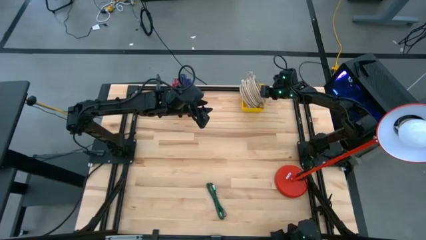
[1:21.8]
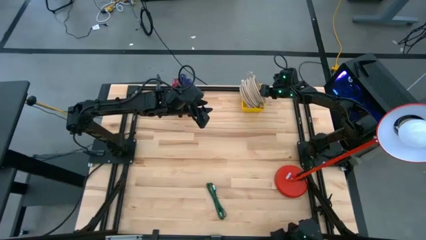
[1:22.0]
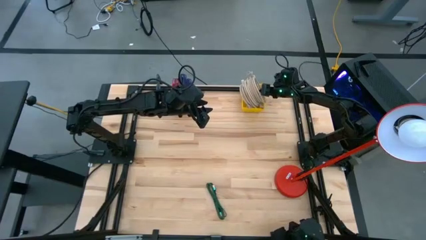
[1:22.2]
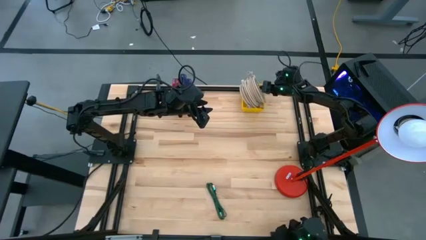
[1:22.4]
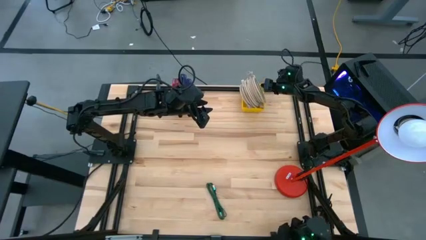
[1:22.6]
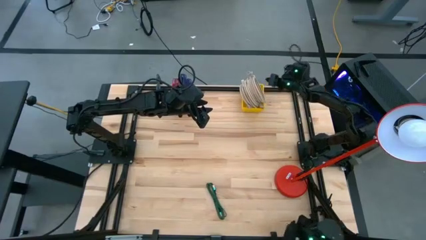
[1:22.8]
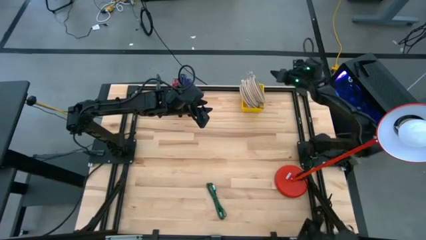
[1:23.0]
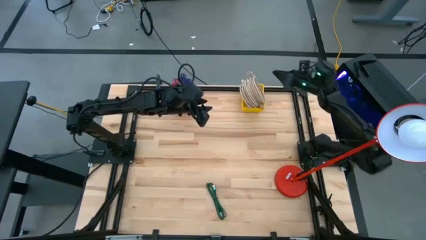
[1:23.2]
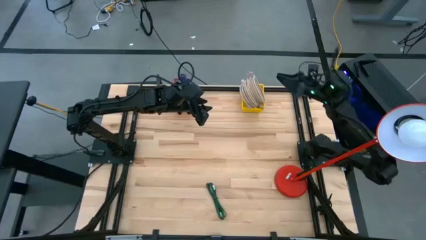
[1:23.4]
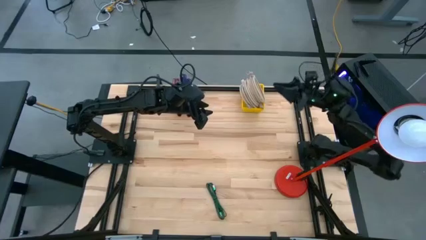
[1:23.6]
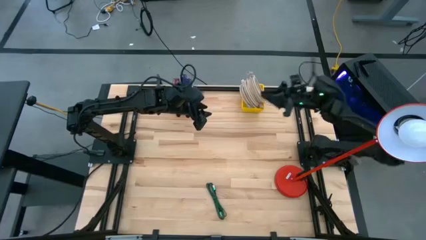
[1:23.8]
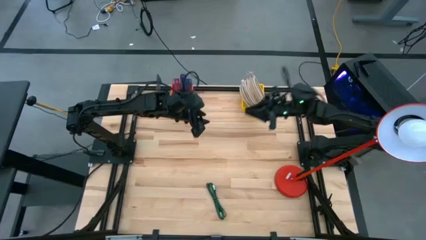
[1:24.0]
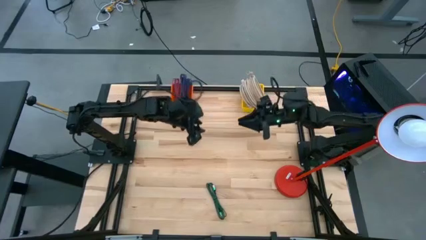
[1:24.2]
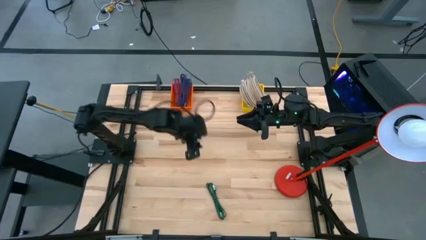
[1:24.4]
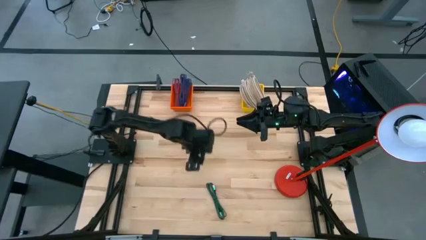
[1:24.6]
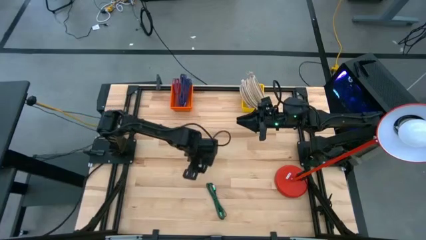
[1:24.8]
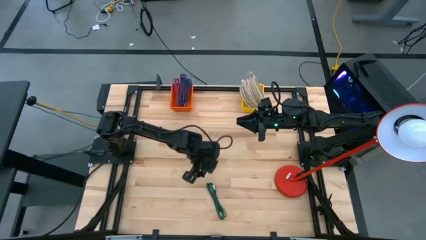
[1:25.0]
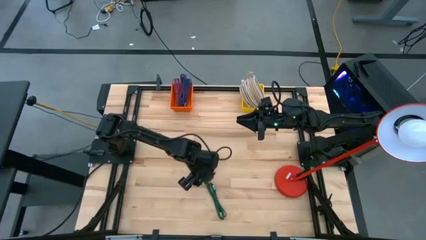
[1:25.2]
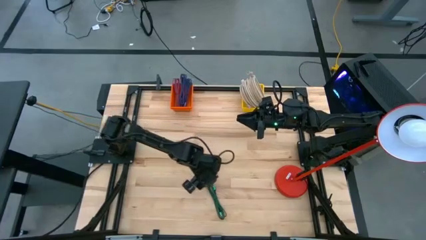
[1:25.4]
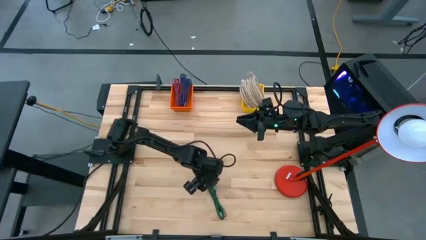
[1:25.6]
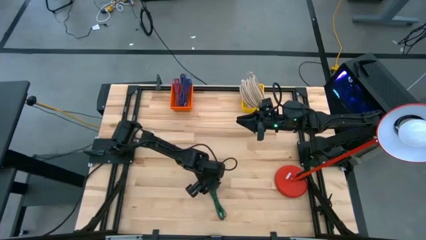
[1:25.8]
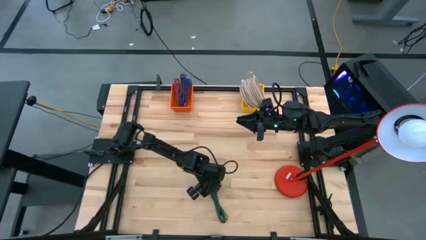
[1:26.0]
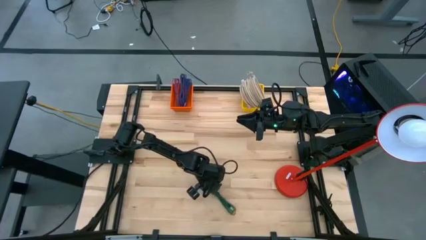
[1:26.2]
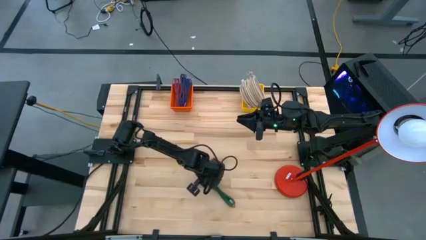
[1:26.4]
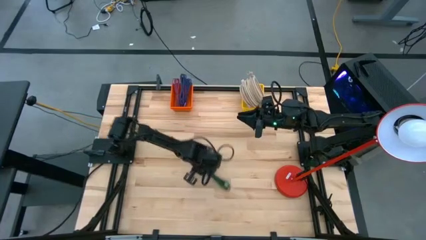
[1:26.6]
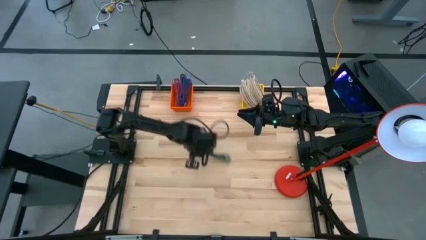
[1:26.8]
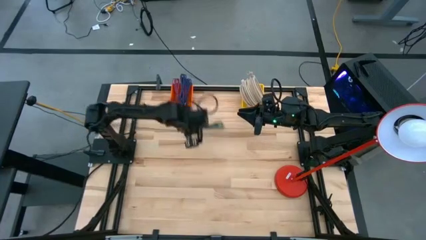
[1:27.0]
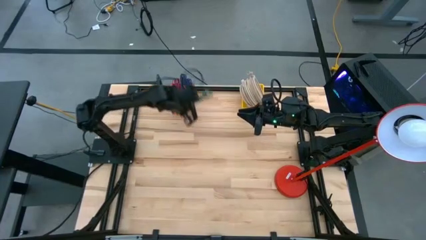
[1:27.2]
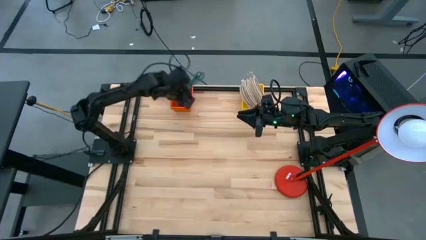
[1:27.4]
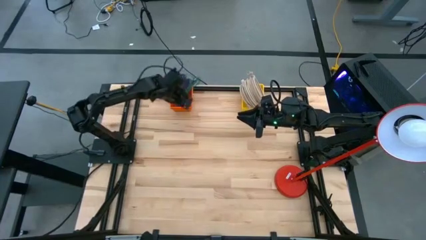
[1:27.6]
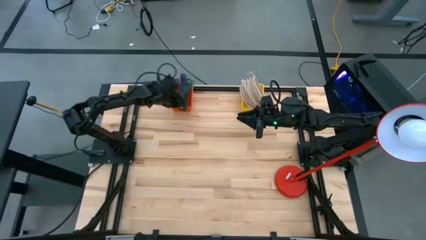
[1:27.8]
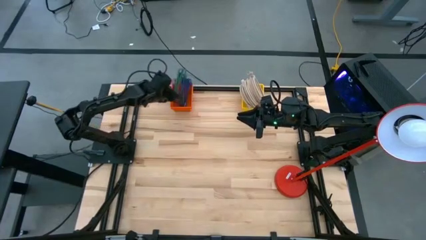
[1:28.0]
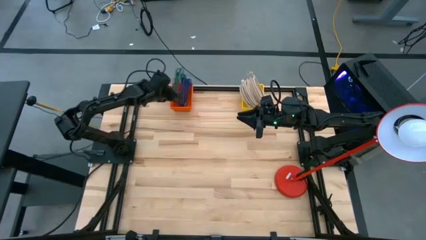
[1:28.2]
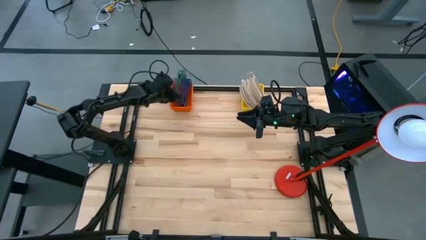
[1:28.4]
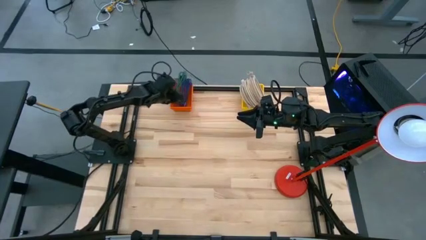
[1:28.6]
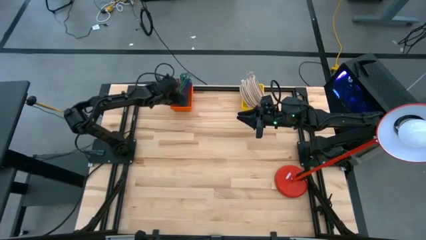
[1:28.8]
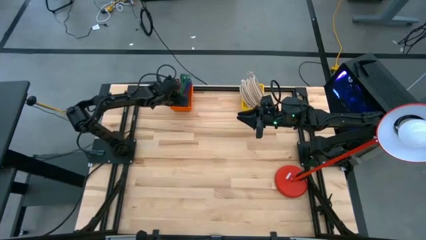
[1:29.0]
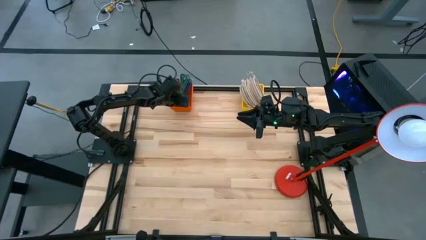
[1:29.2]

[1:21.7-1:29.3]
Task: Pick & Place USB Port
Put the green charger cable into the orange bin

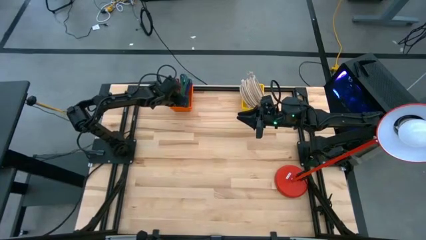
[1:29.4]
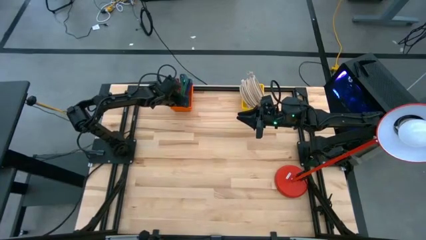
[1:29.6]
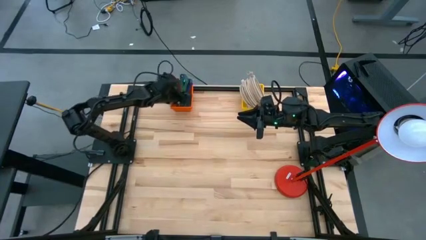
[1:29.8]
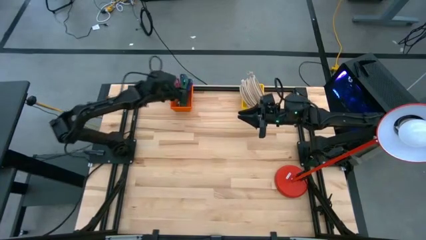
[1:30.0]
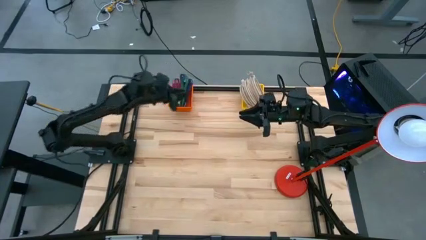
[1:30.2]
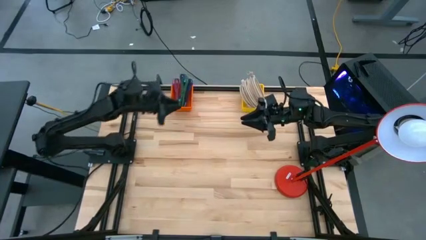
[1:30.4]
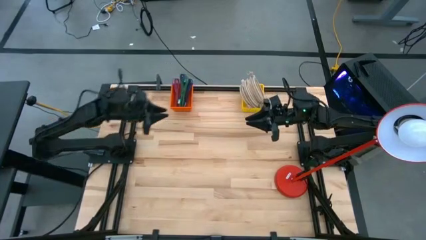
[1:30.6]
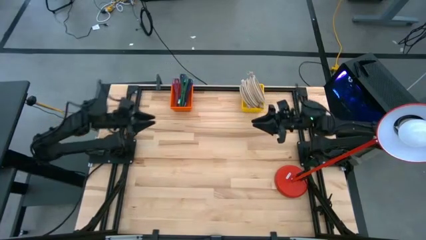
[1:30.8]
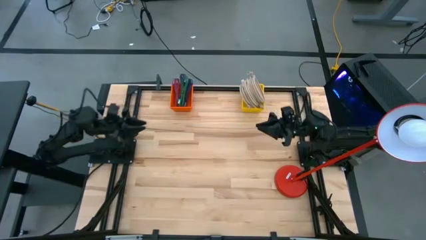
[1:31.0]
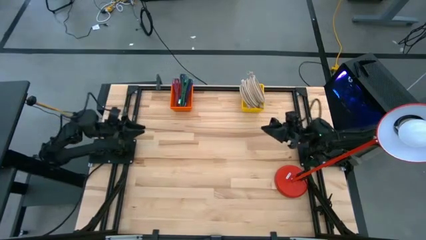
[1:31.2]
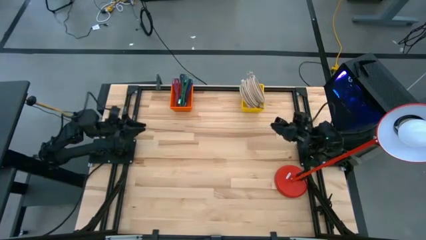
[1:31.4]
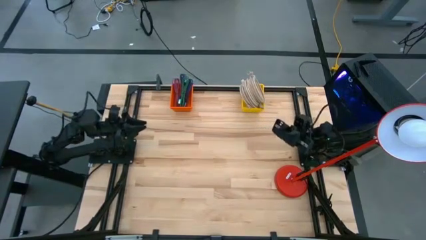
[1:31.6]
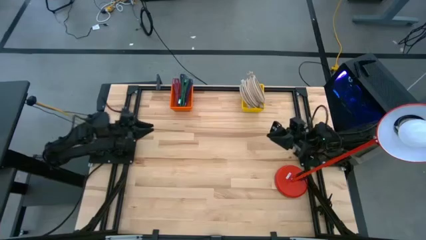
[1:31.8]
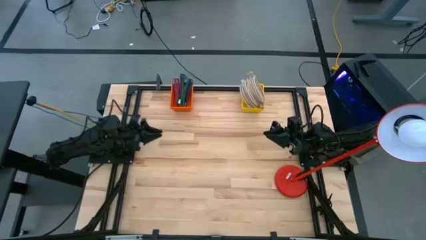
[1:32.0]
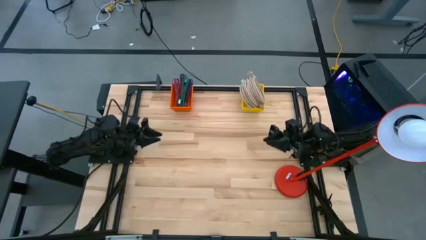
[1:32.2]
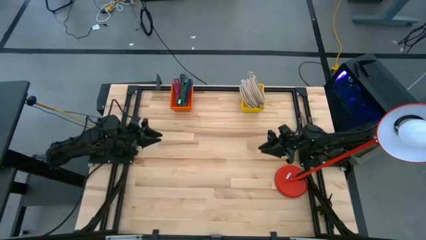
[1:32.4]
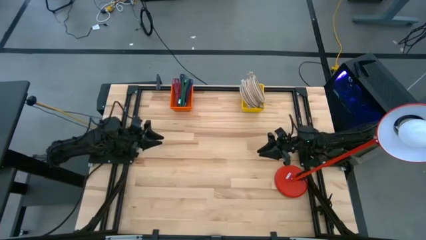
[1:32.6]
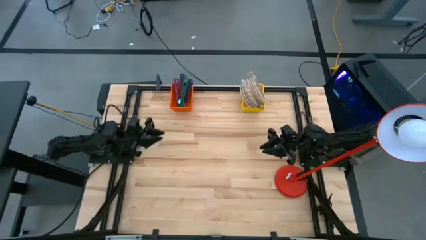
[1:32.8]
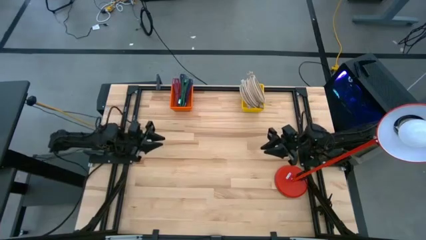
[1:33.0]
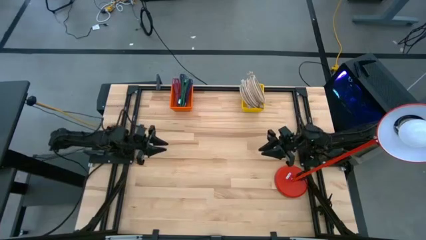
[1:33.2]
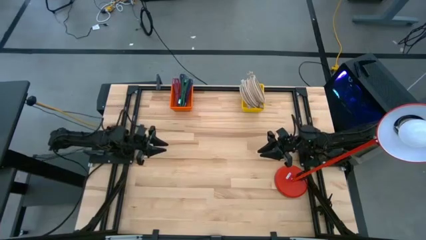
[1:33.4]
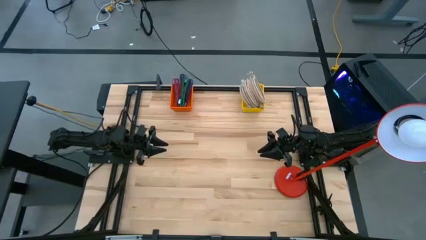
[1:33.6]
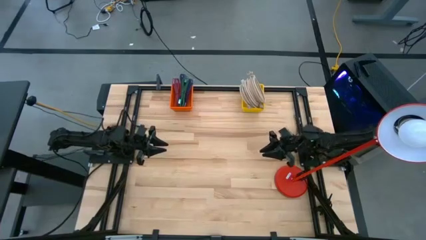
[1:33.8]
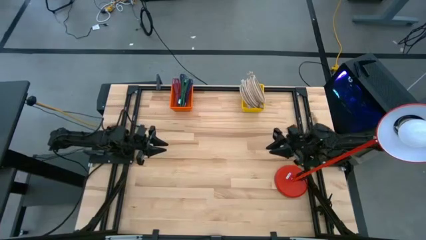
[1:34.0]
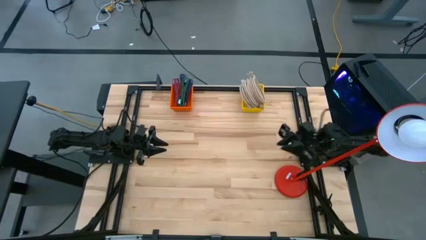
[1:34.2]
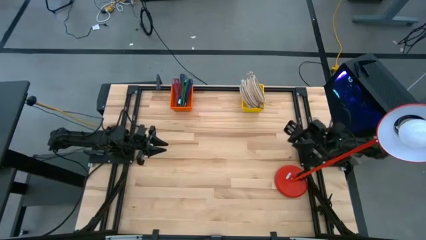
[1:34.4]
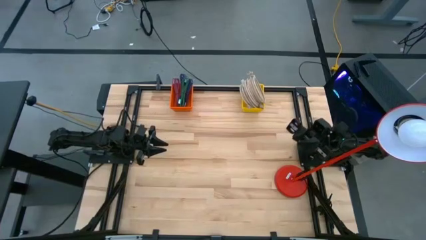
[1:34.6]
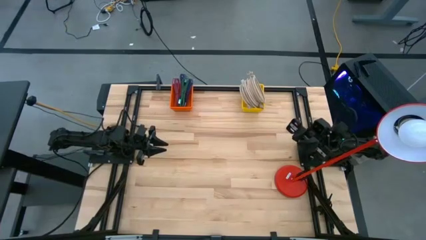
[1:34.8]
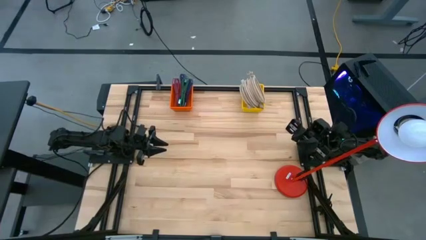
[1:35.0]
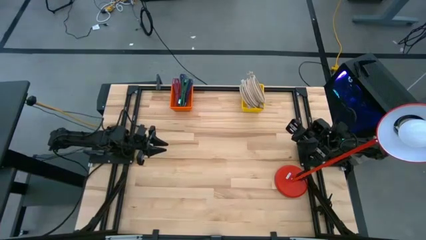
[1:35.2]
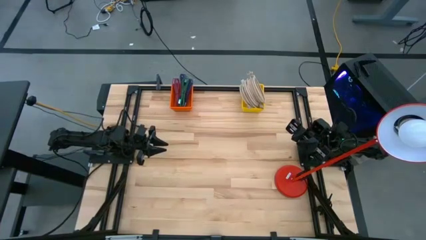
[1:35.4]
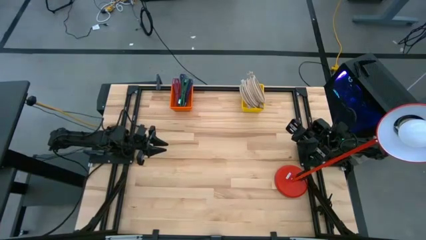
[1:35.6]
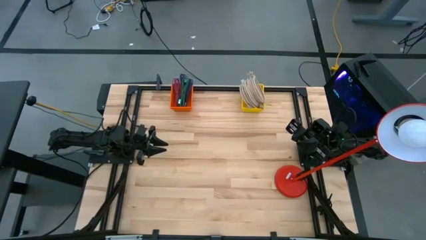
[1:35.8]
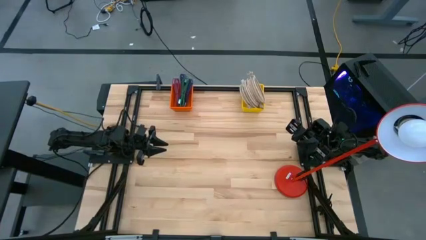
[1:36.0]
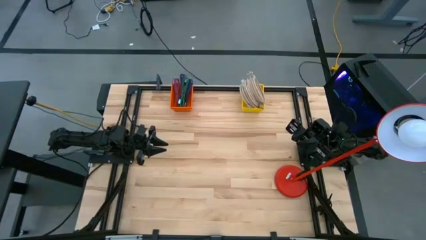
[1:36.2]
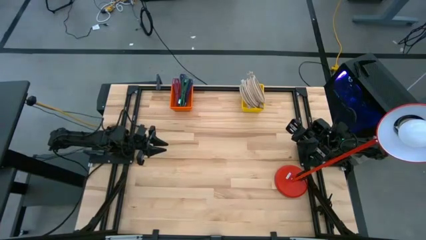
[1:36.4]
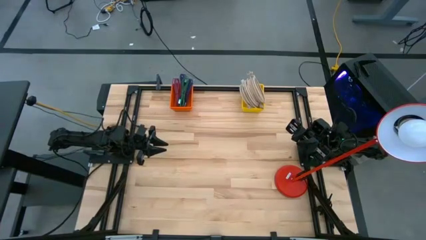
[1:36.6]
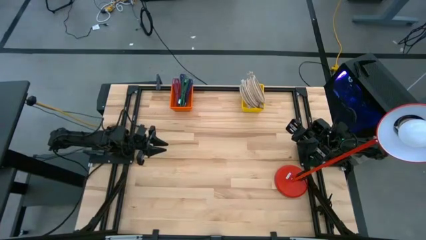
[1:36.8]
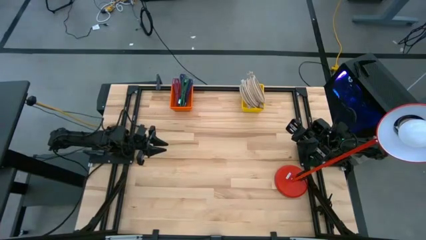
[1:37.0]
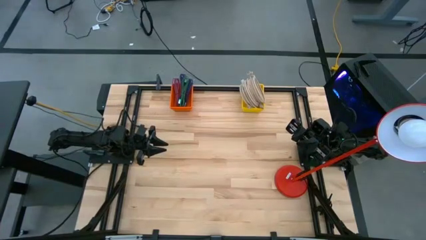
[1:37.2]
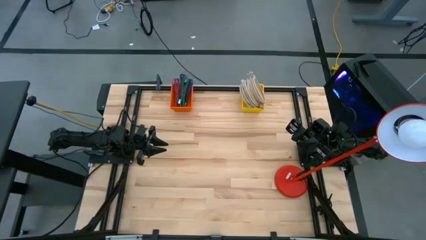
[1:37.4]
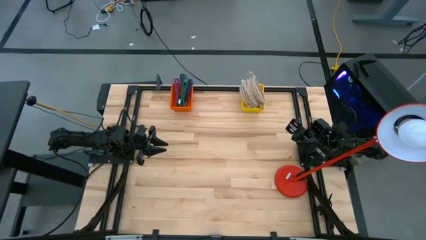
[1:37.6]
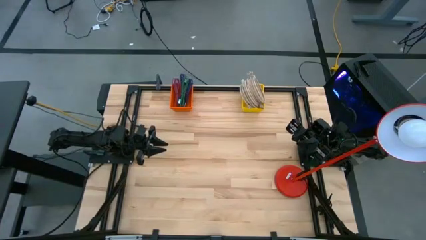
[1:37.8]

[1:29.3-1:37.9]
Return to Home Position
